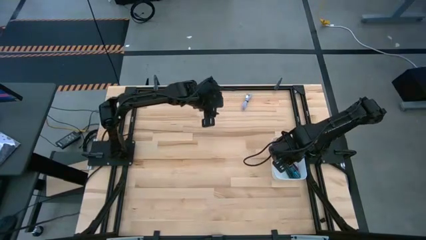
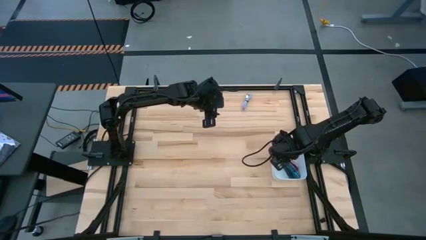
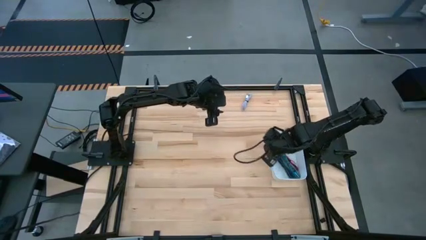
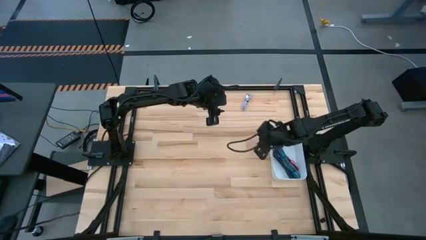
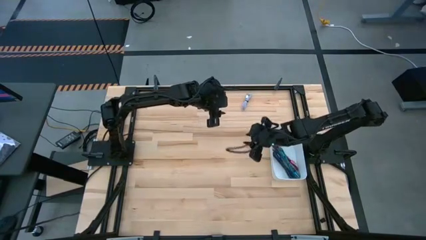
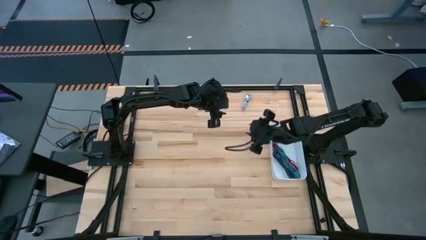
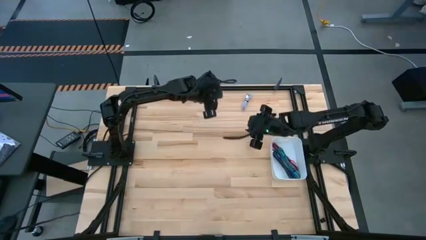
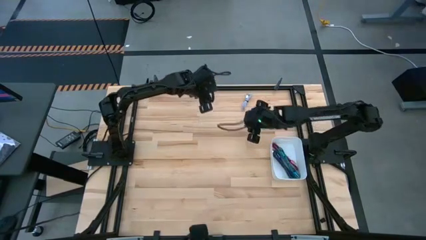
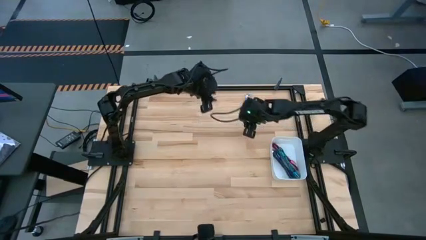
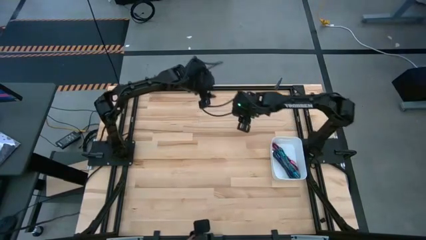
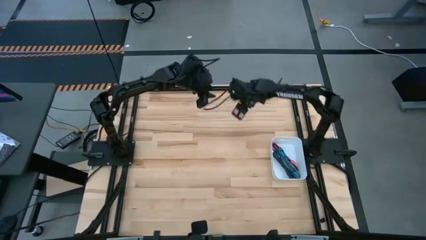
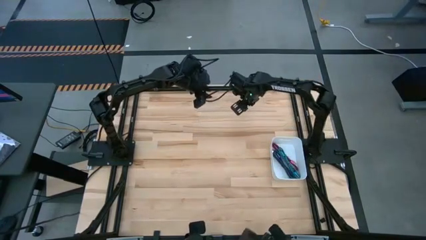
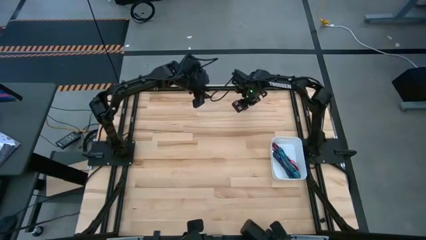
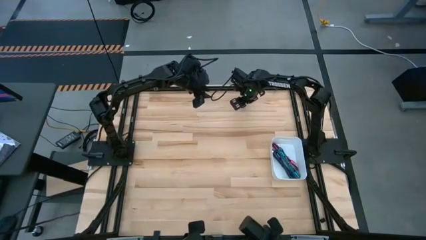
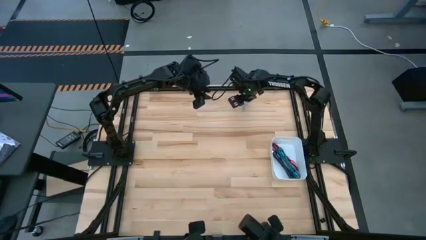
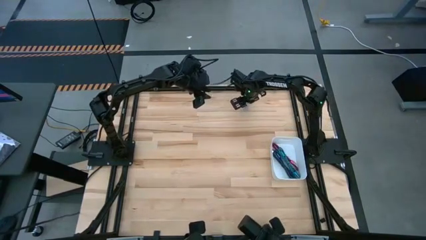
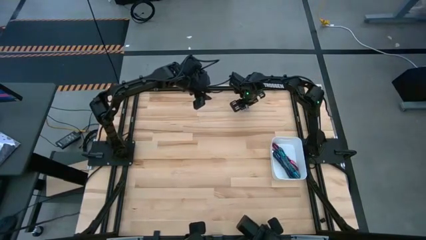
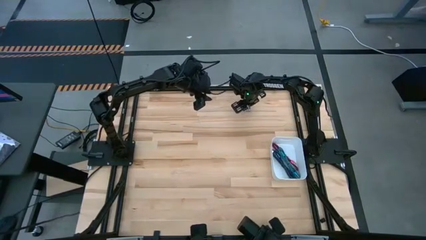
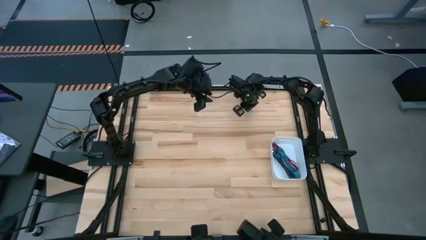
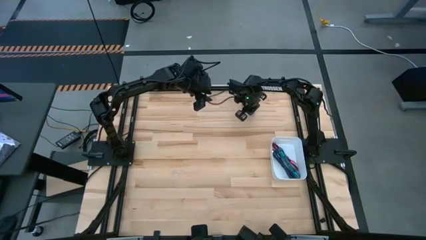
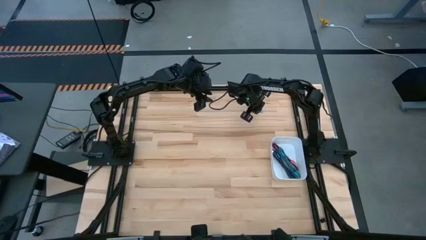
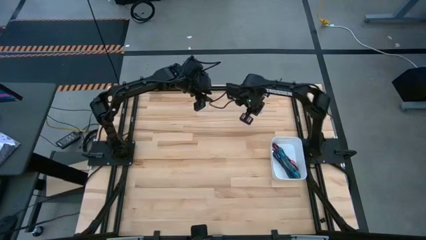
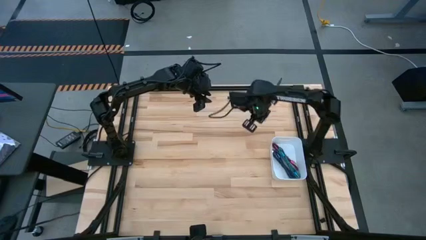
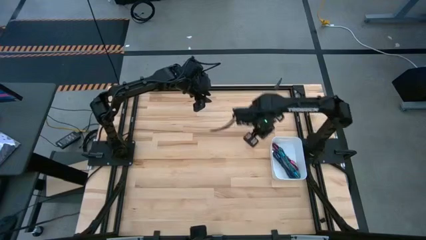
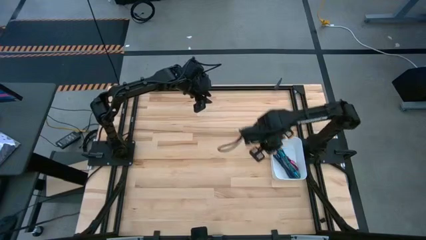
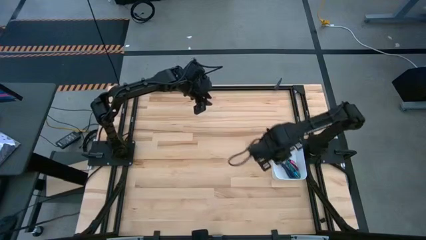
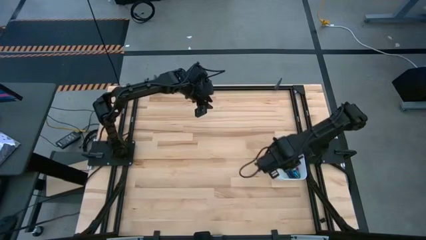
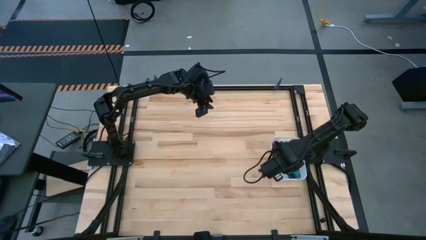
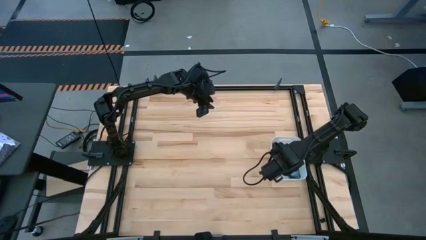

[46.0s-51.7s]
Task: Pick and place USB-C Cables
Put the white charger cable into the white bin

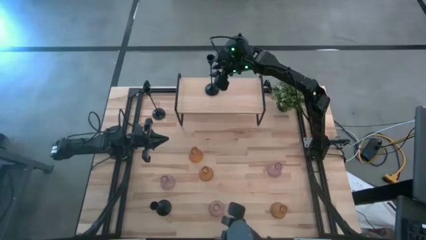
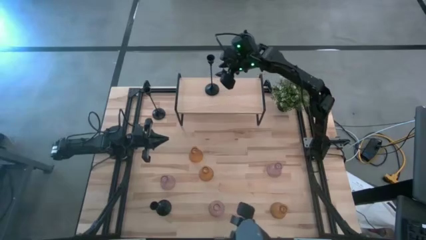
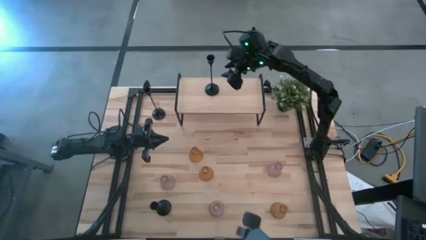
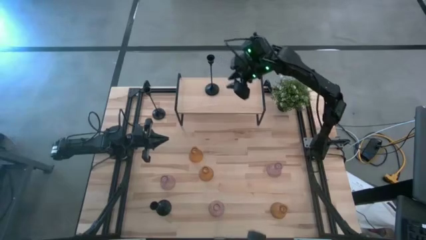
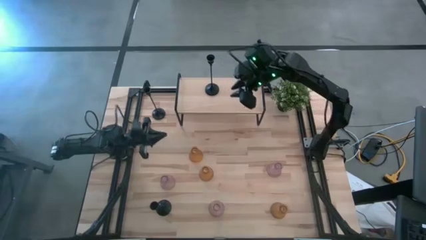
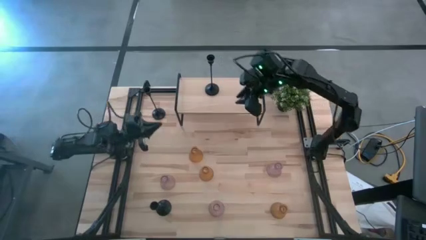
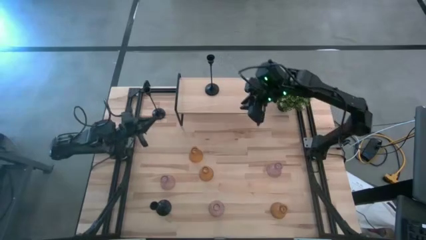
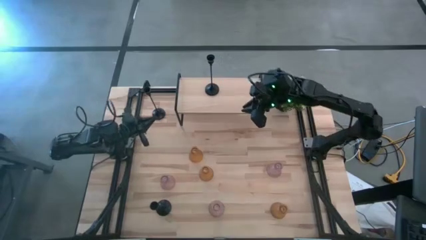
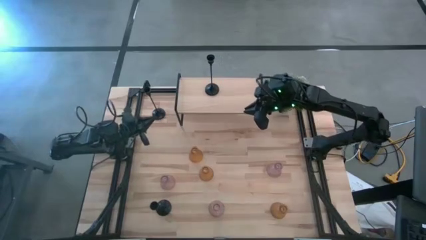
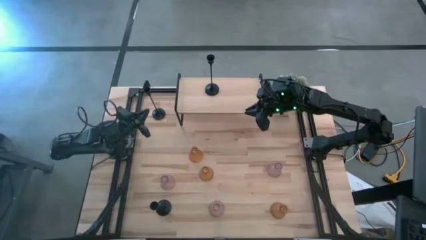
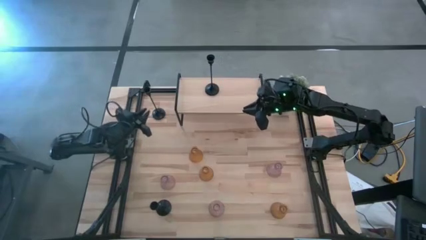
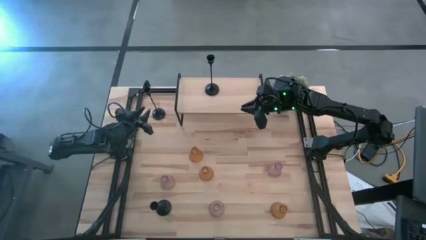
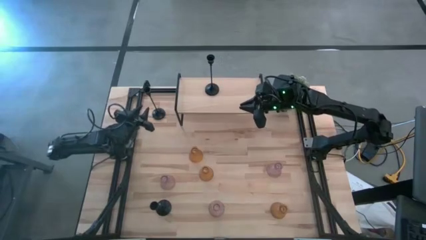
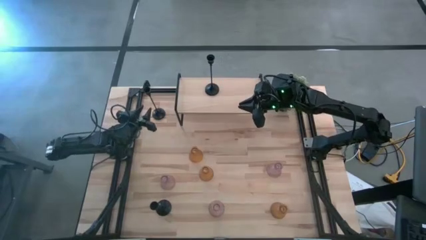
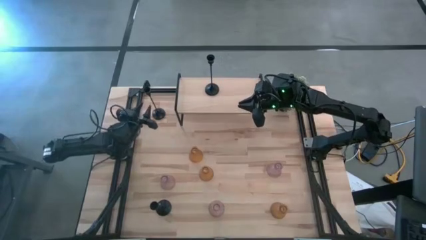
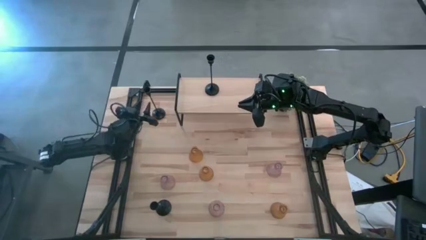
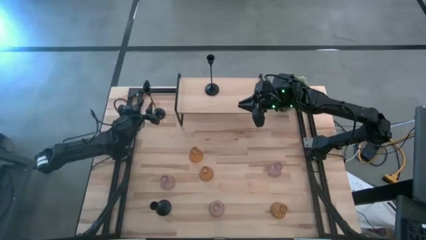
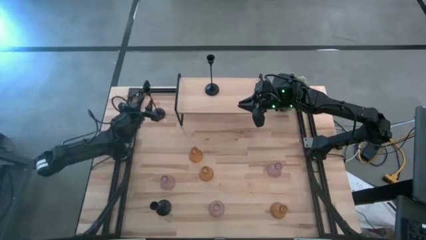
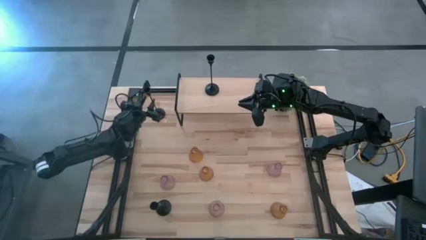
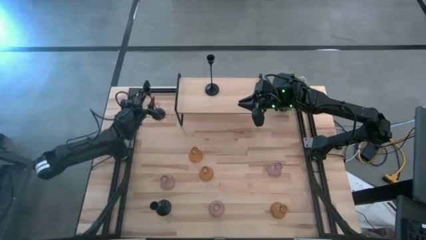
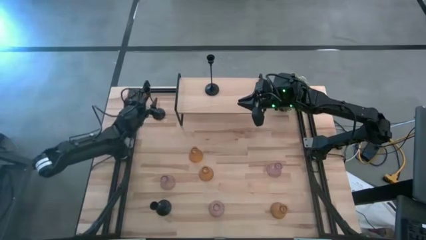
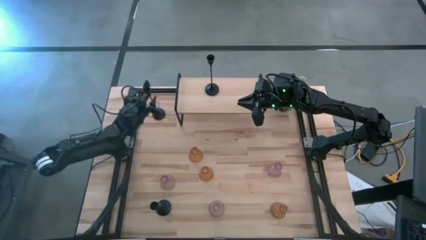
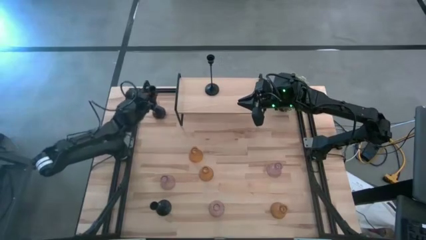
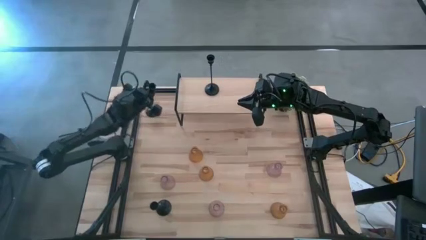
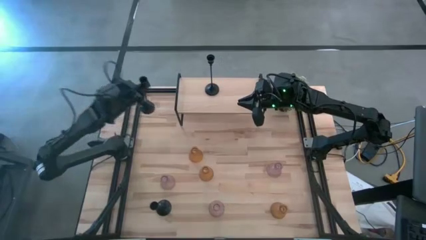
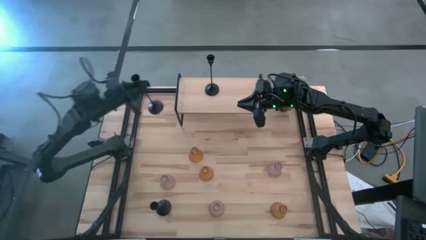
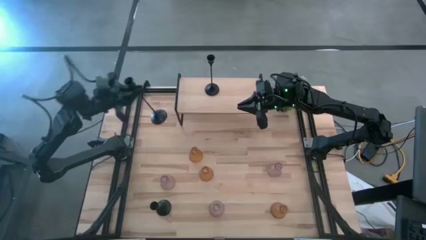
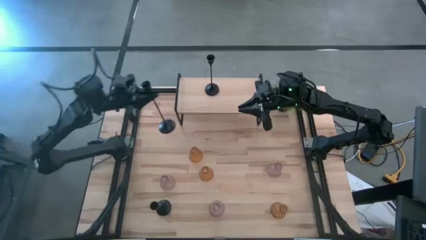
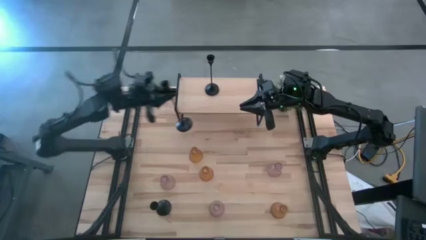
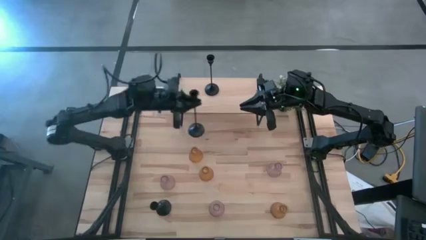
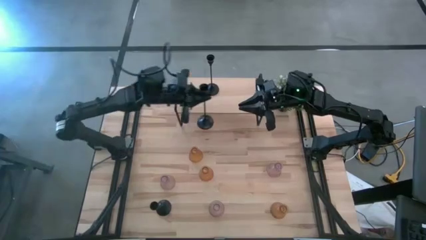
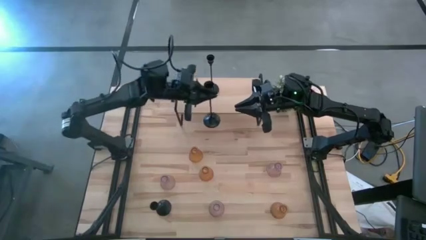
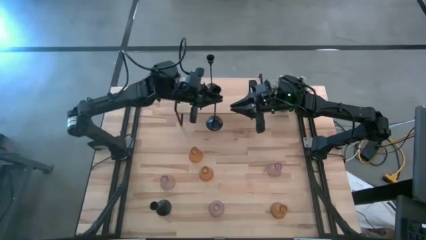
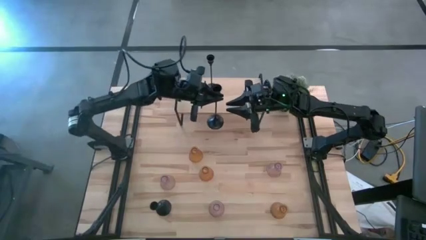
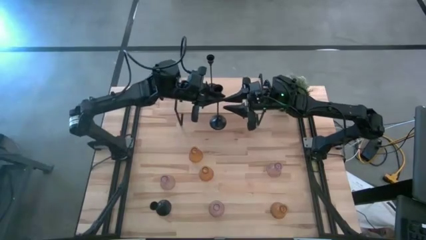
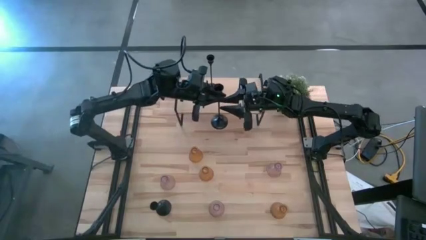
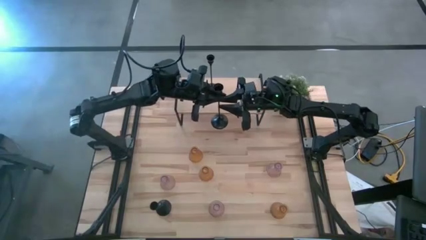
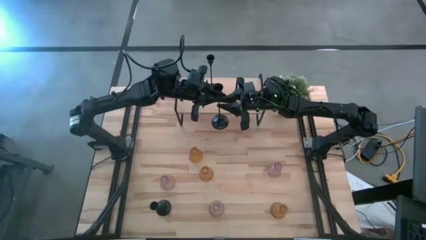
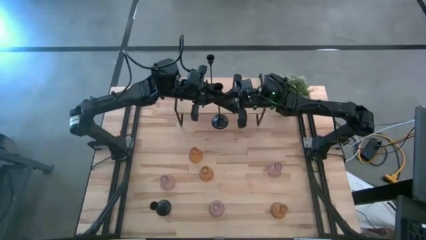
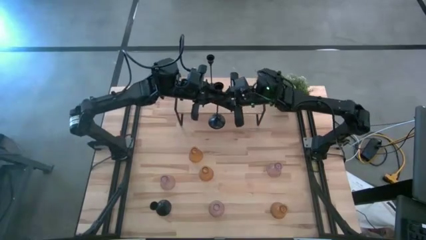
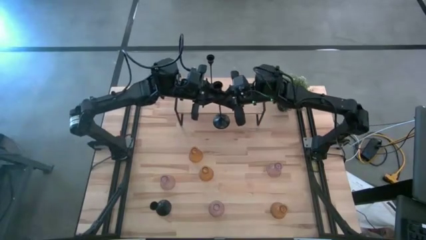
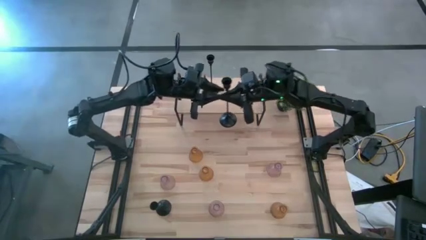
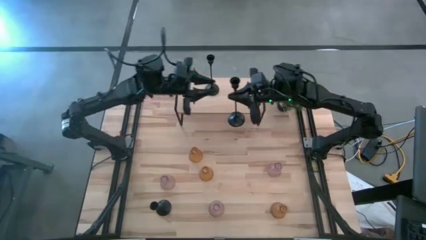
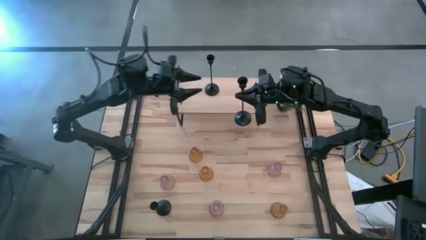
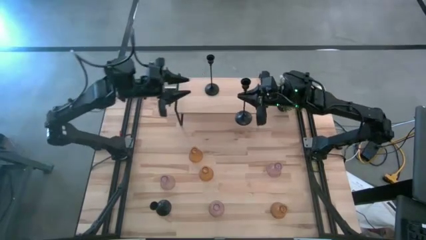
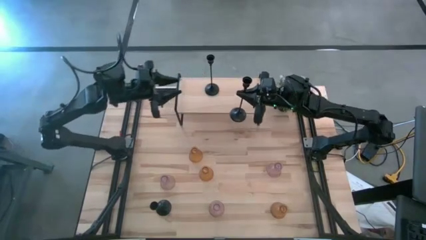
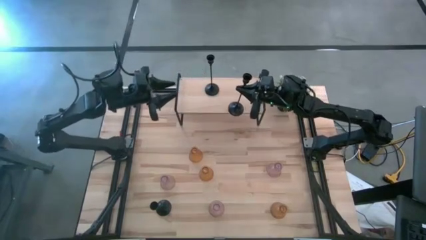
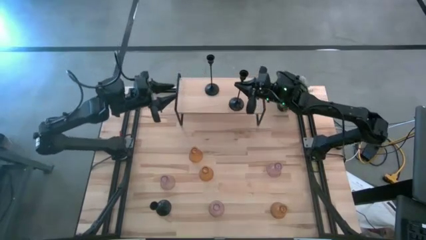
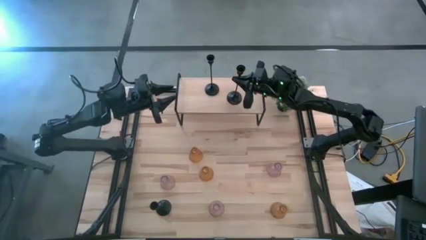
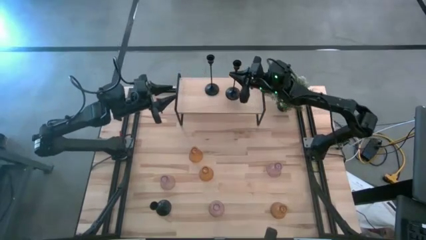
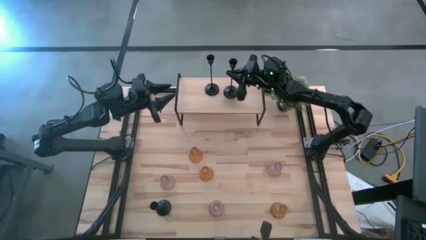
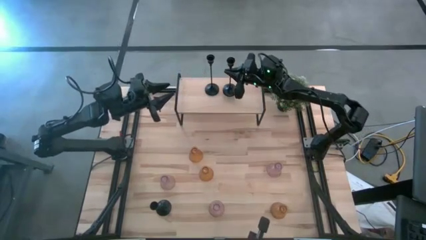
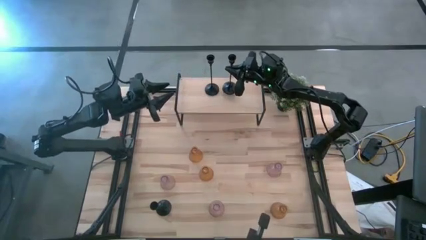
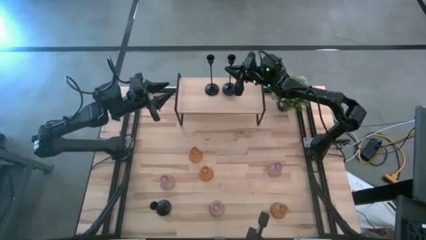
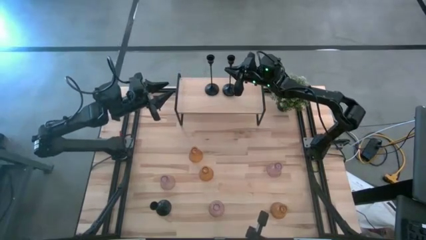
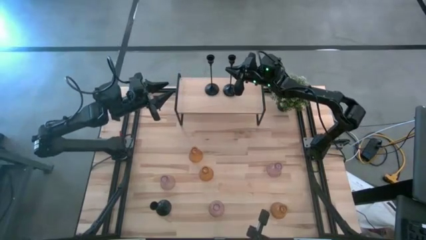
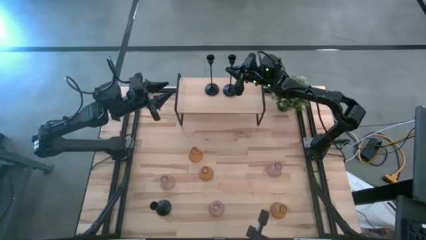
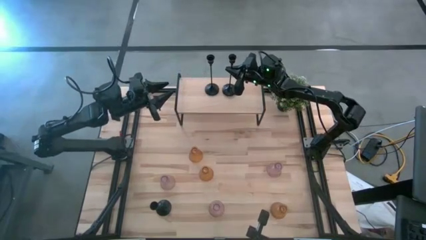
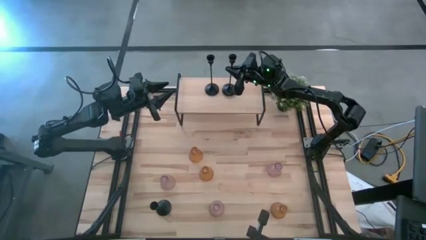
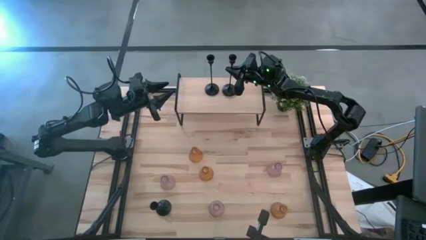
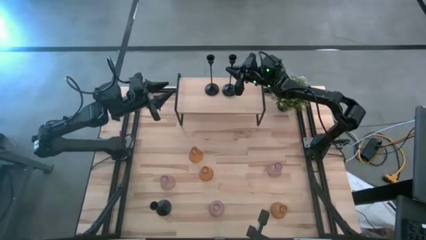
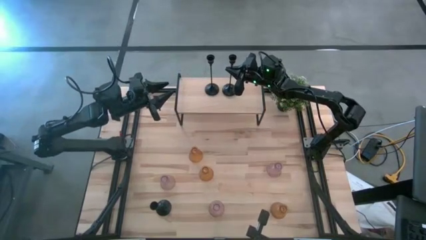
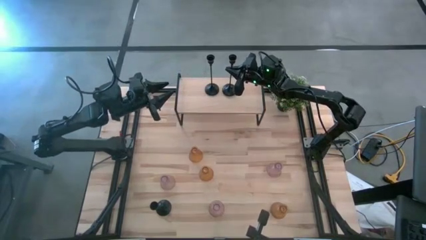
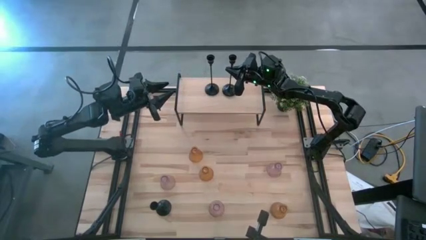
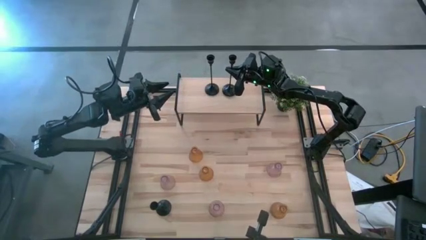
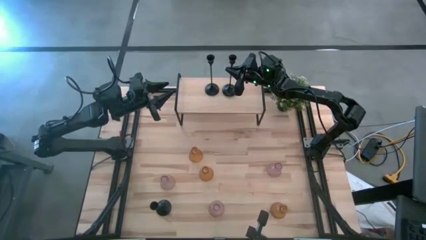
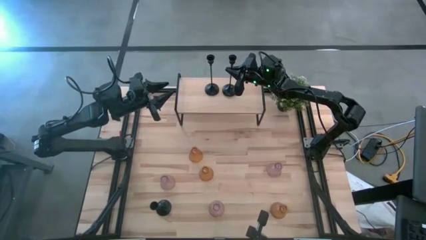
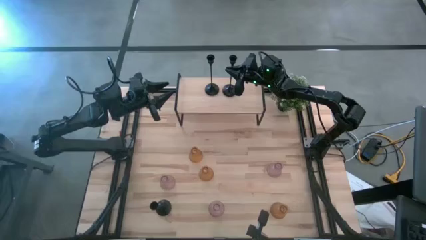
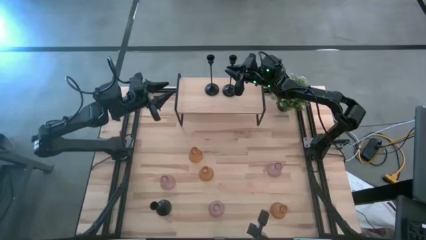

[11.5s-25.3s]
Task: Pick & Place candle stick holders
Put the top black candle holder on the shelf
